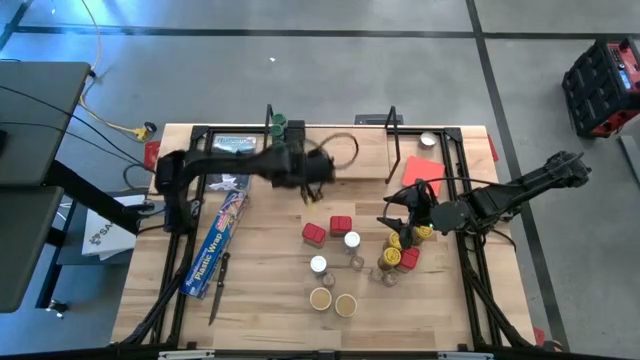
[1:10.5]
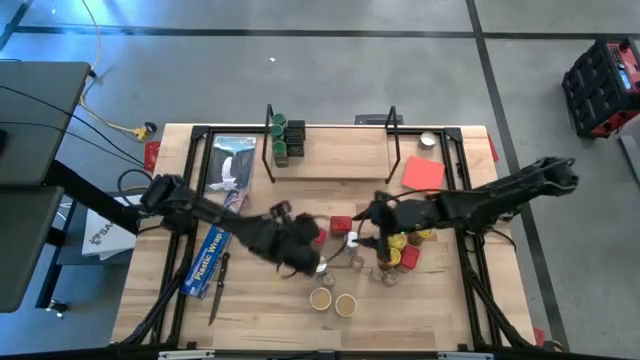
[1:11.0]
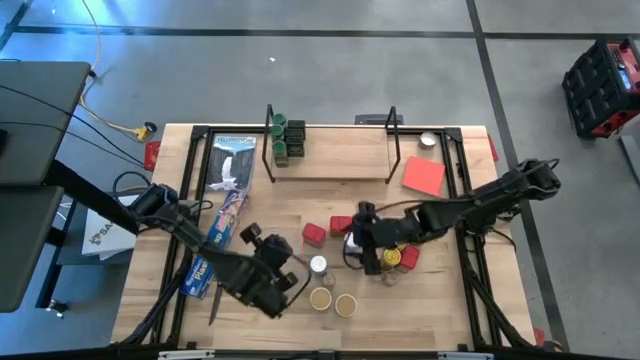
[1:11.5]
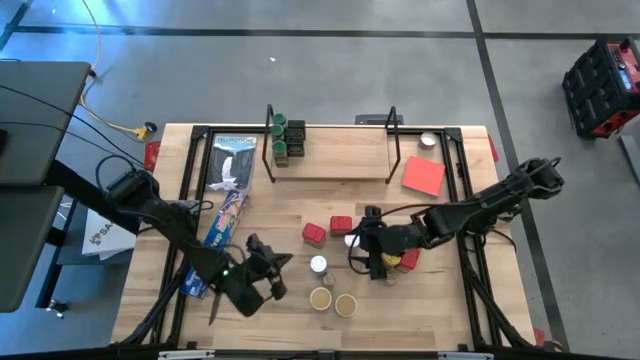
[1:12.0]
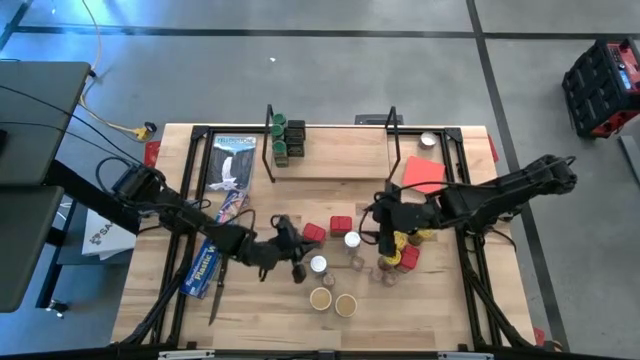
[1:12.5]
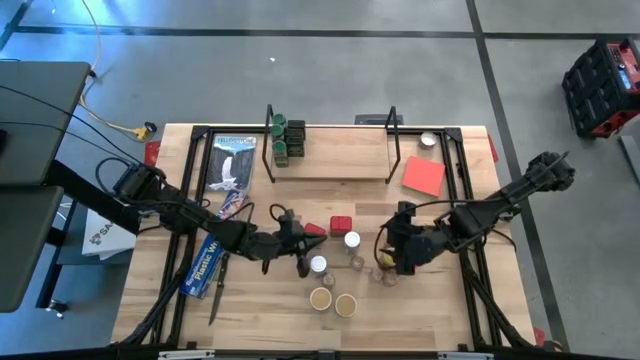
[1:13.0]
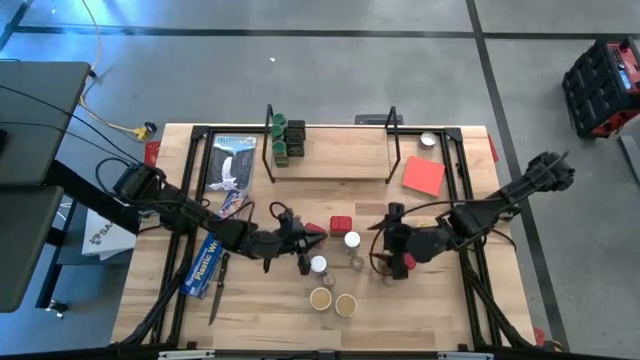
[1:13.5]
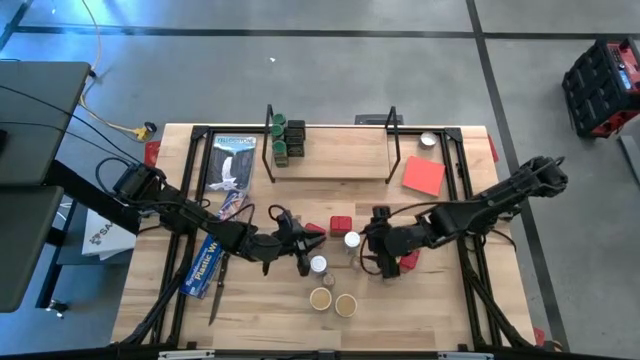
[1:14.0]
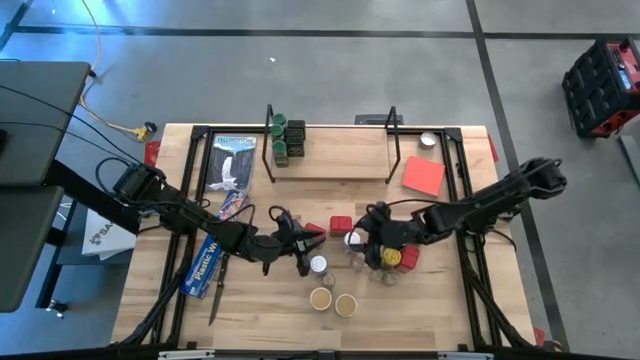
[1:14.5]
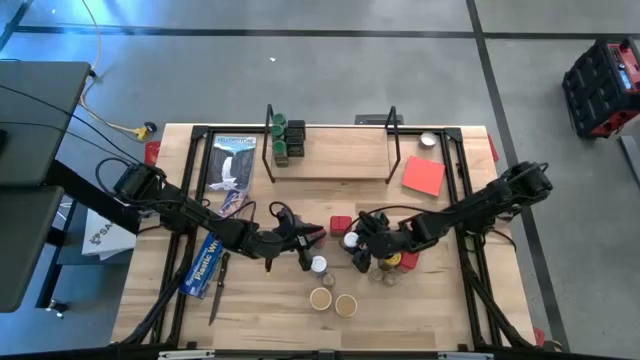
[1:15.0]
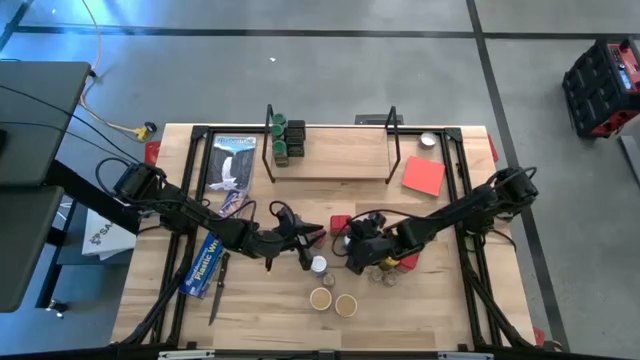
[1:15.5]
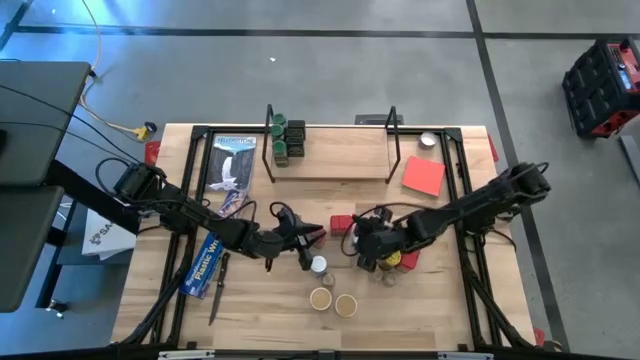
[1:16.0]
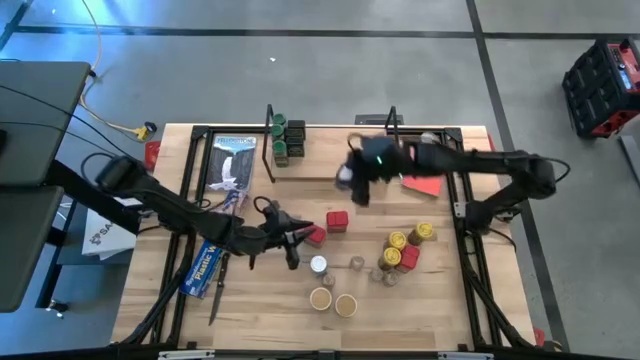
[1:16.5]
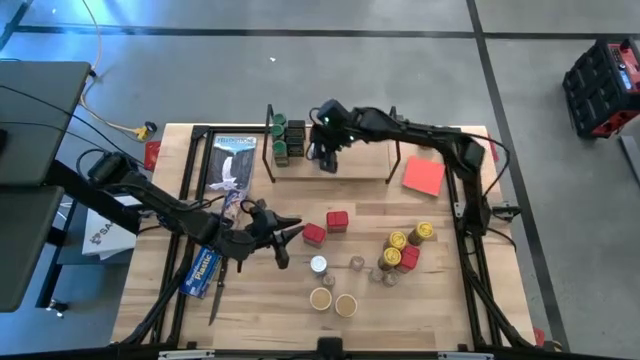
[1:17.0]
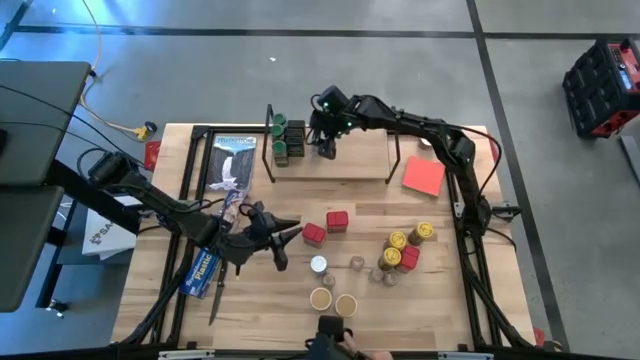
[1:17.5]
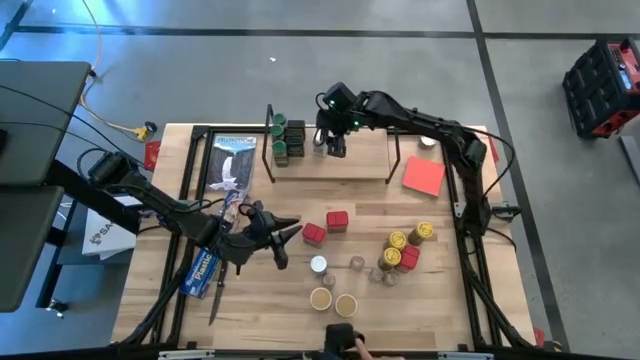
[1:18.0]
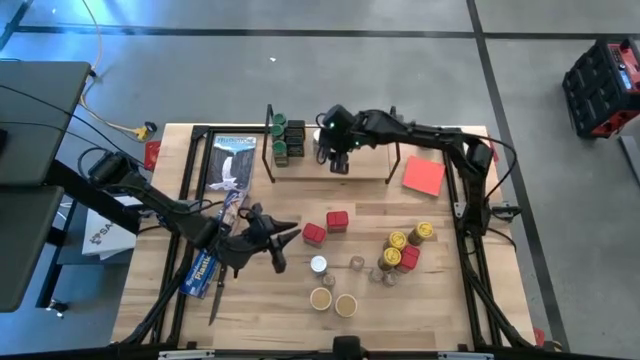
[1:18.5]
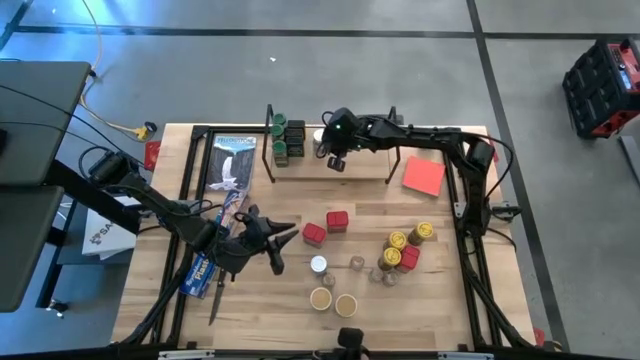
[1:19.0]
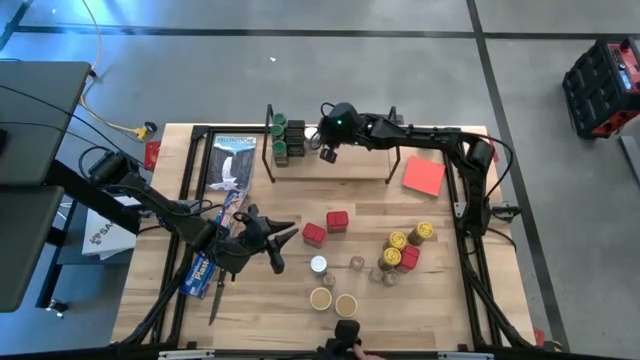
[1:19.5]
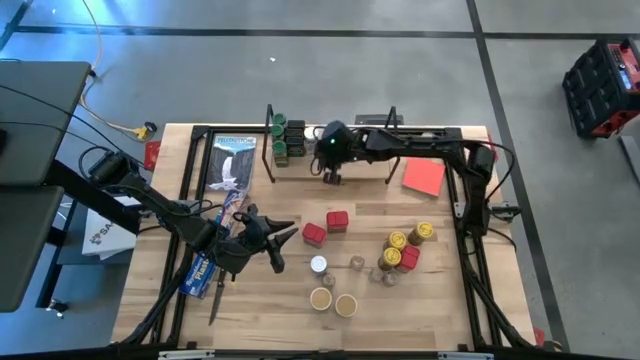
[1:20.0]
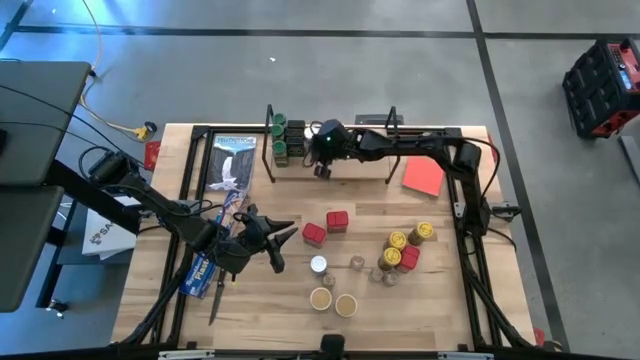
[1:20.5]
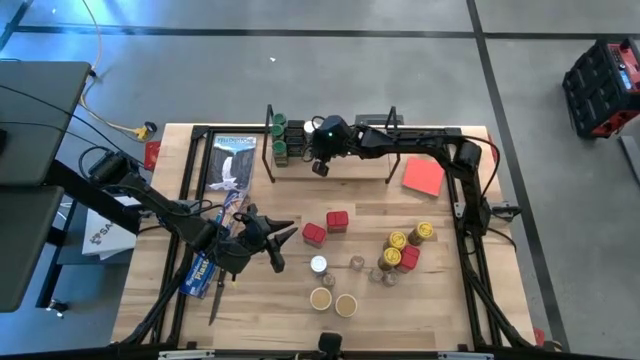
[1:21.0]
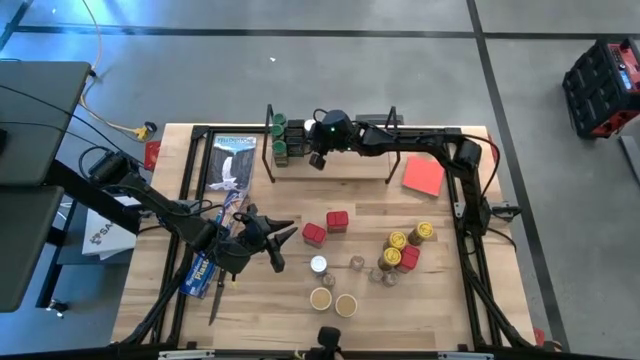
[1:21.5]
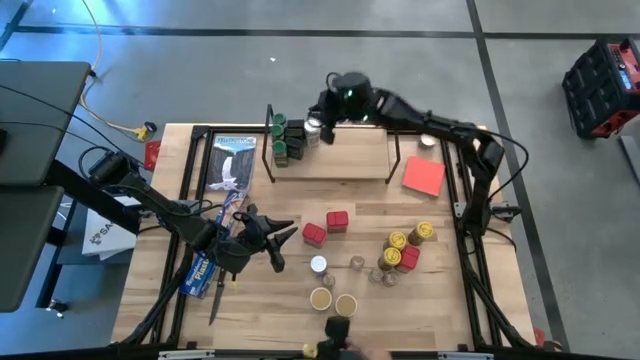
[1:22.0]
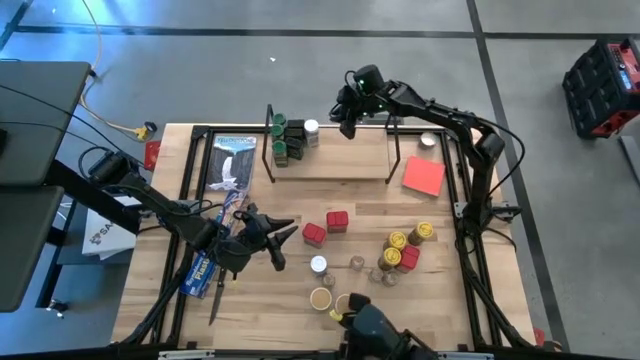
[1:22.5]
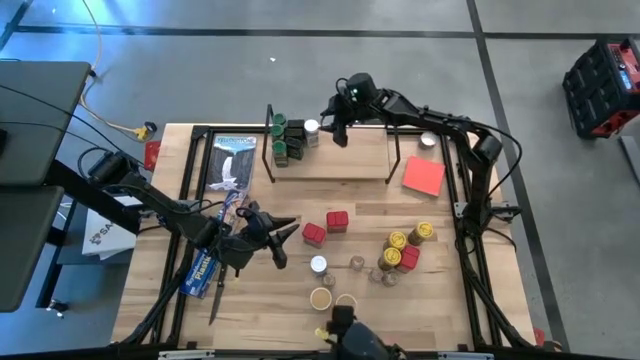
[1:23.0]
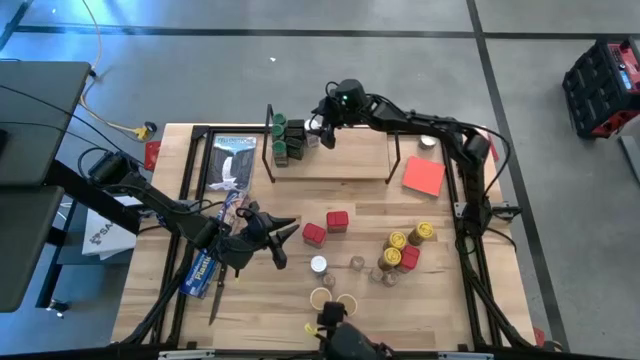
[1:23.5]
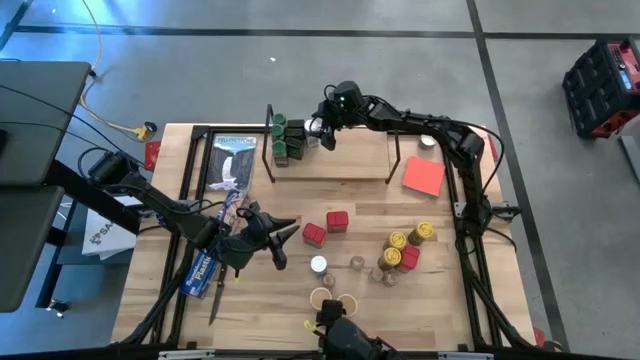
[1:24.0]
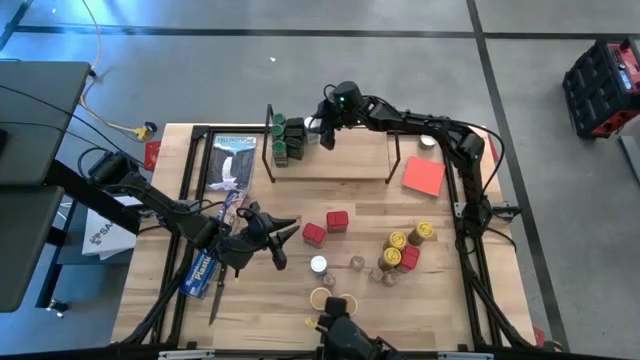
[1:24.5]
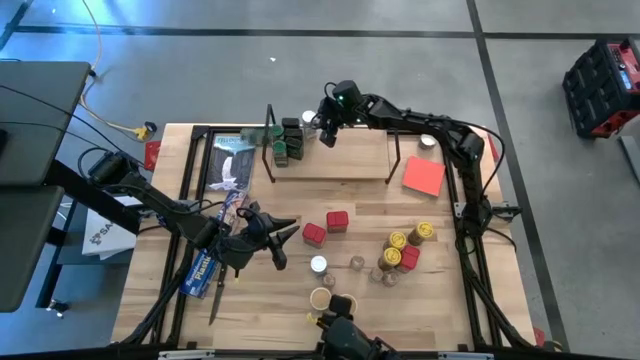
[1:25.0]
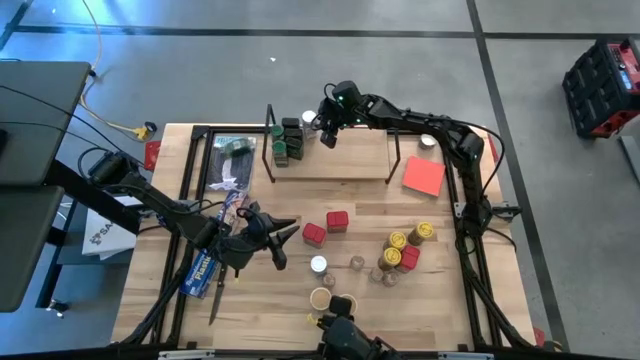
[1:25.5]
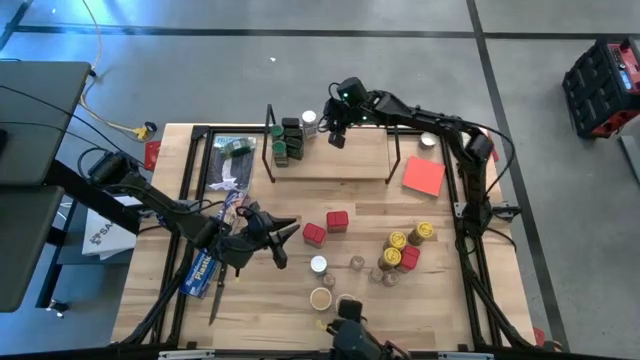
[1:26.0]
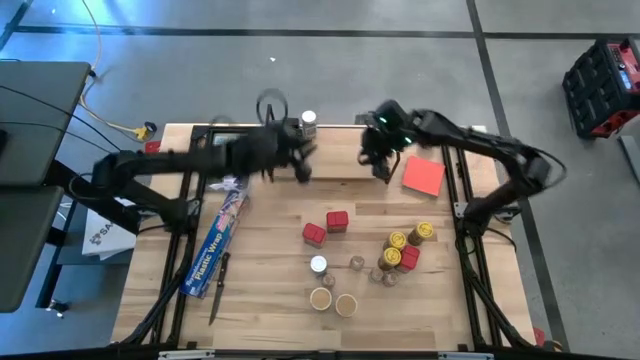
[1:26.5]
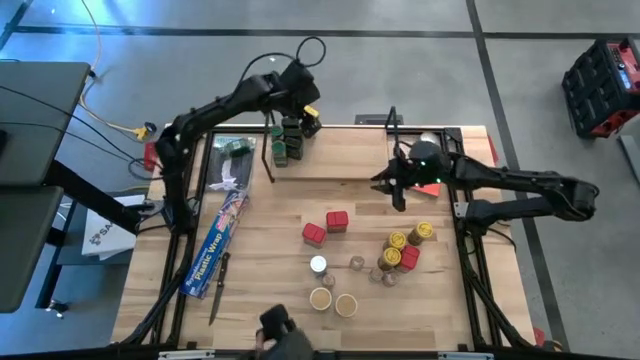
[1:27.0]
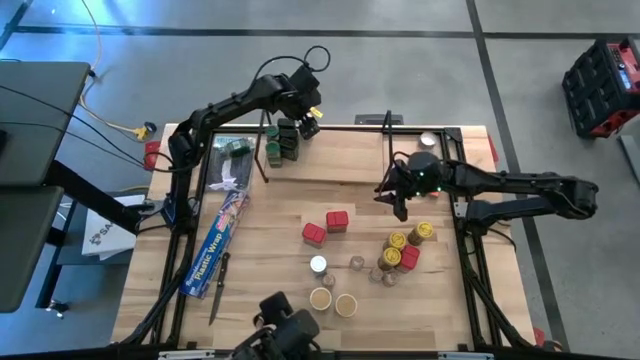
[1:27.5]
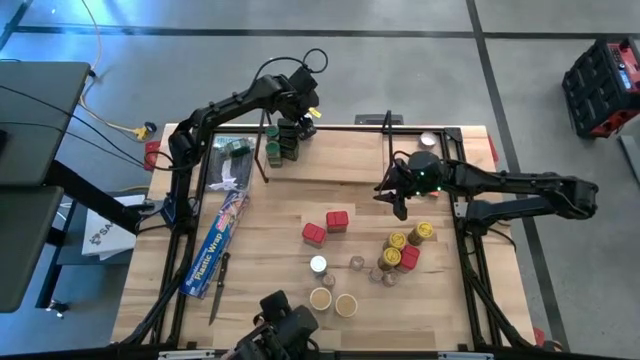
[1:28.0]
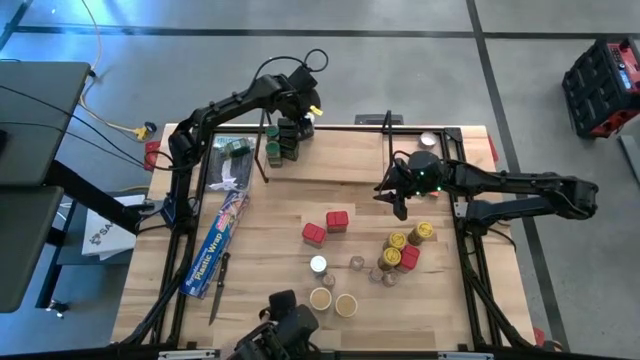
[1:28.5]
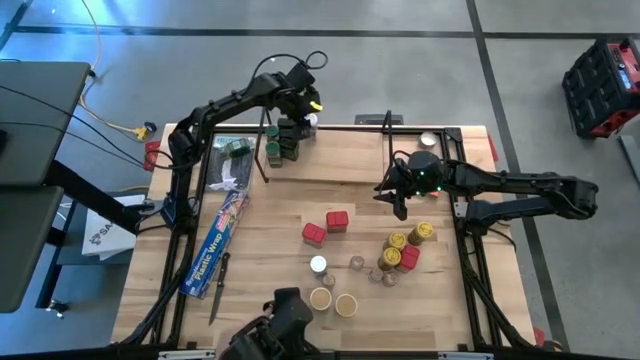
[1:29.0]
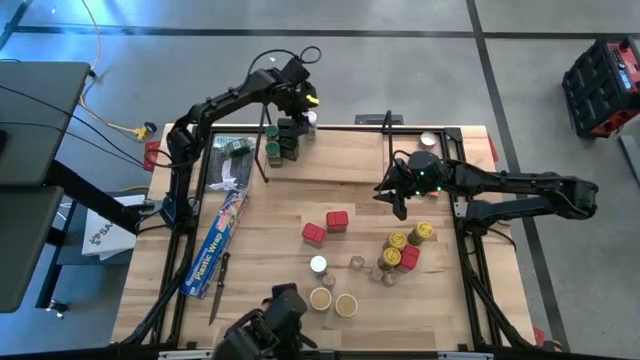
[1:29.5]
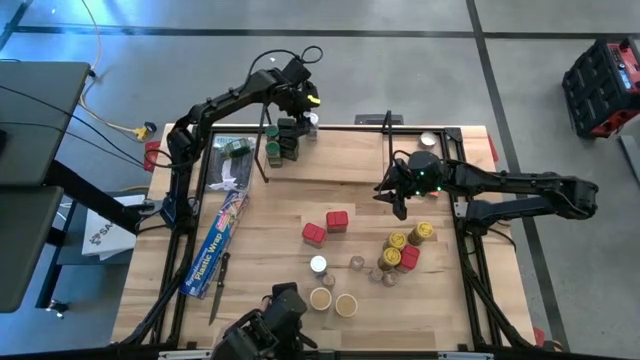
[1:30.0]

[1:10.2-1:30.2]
Task: Shelf spices
Put the white seasoning bottle on the shelf to the right of the top black seasoning can
